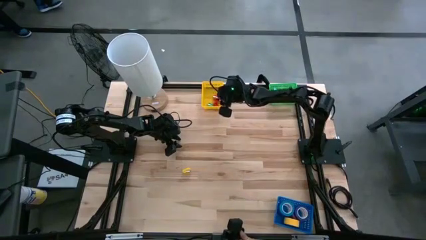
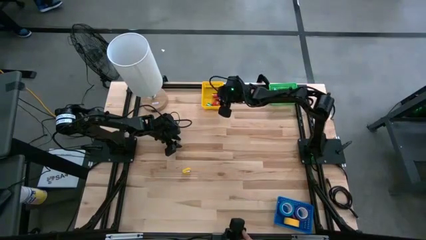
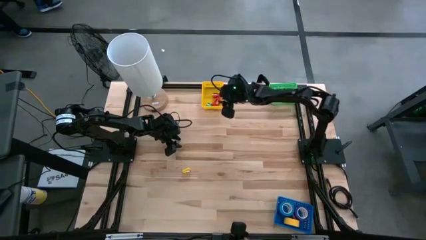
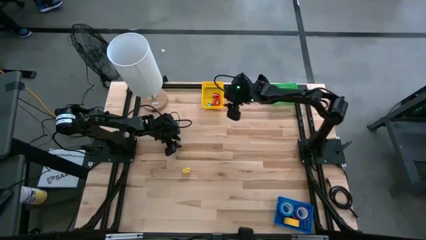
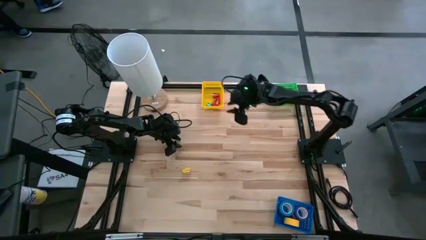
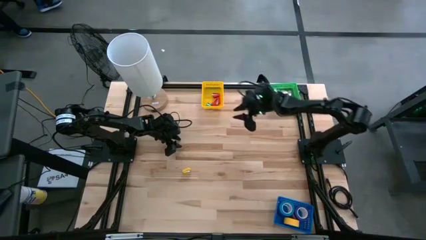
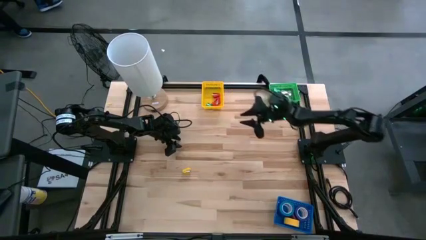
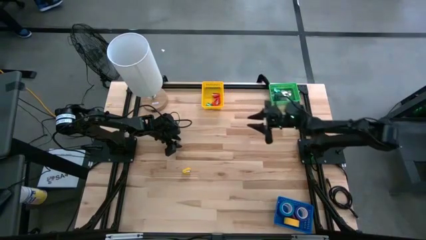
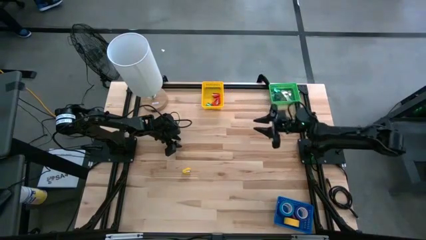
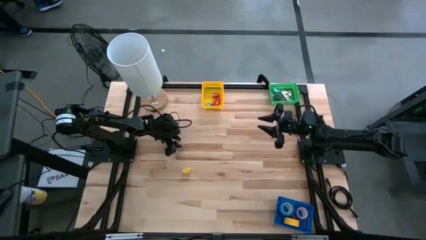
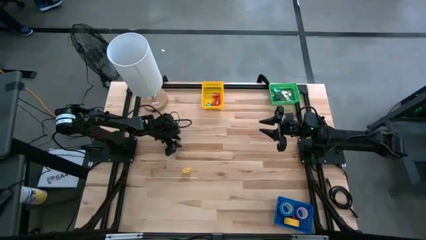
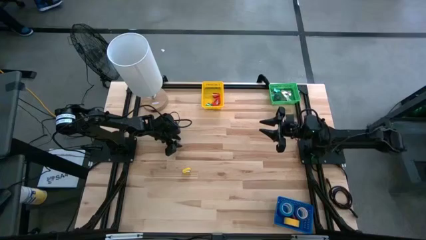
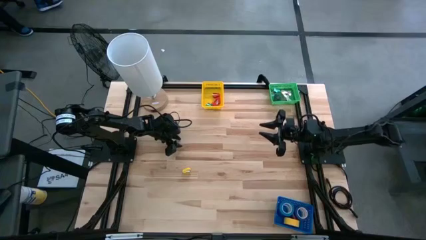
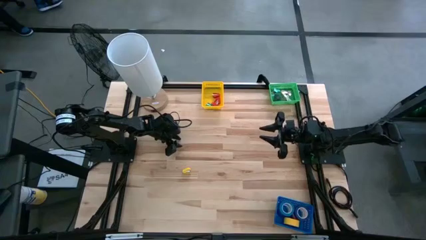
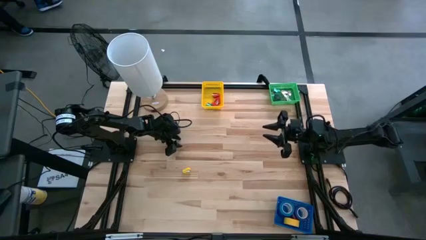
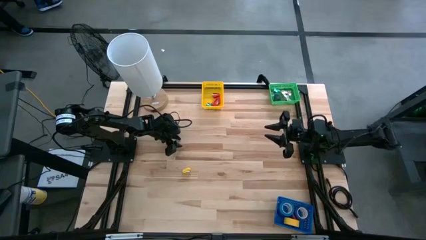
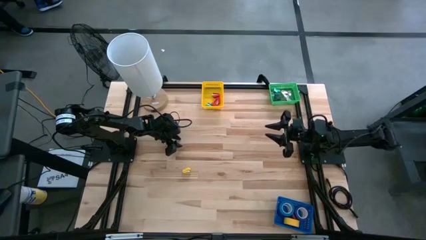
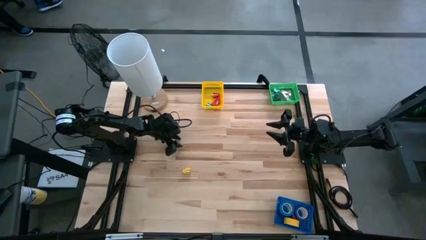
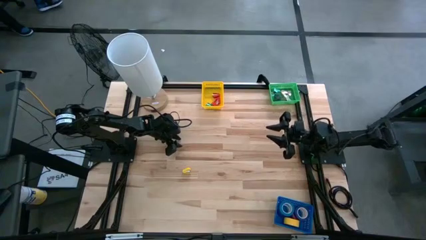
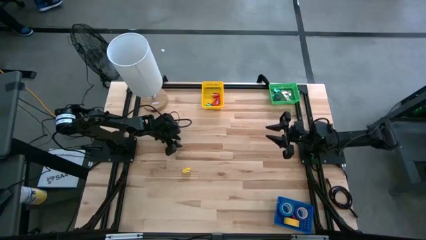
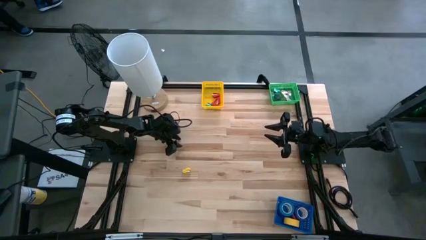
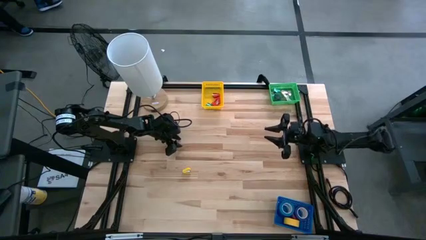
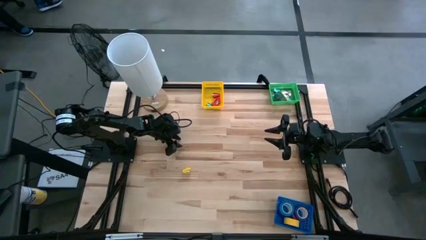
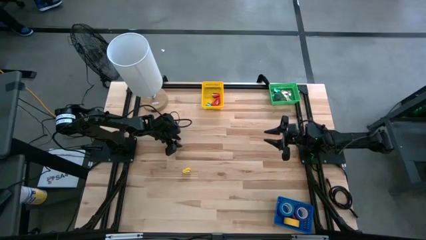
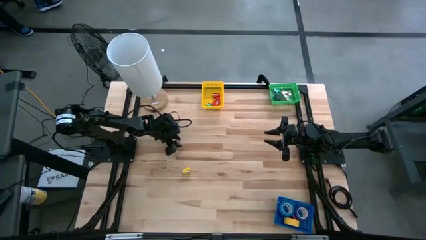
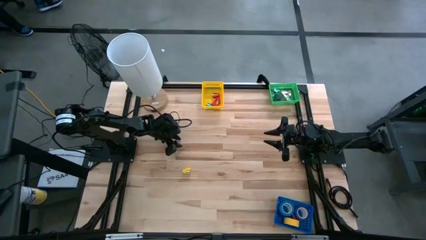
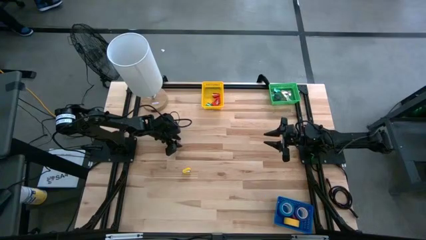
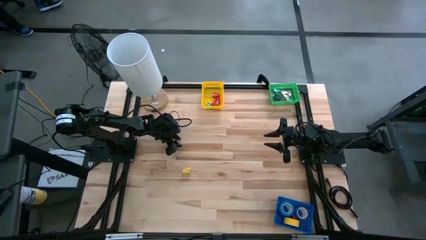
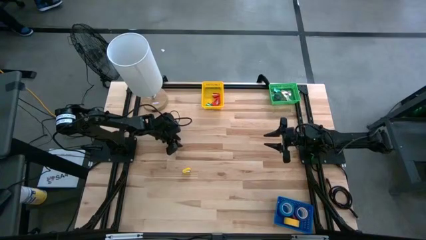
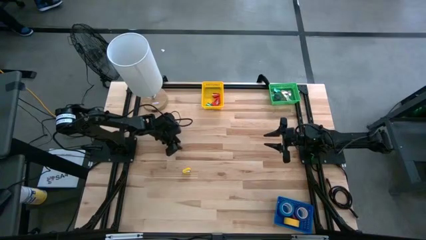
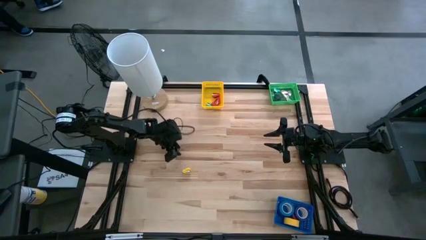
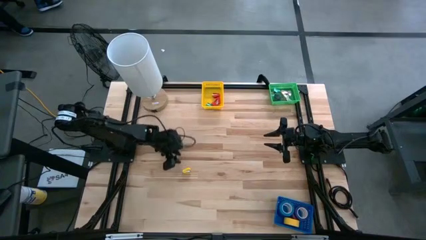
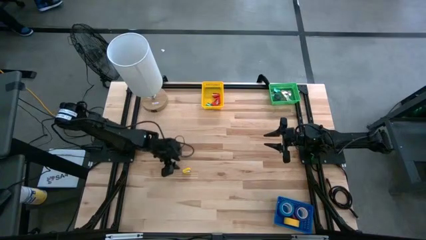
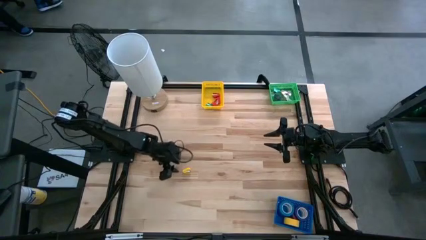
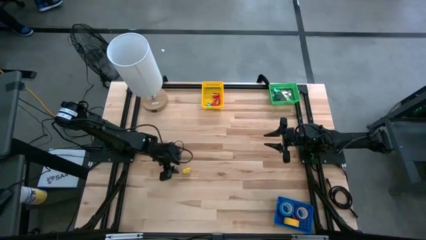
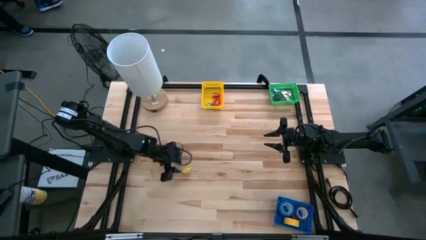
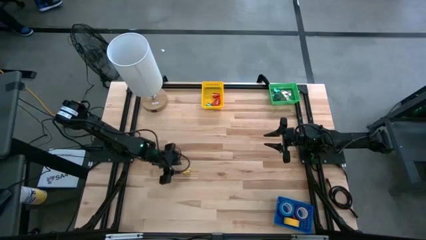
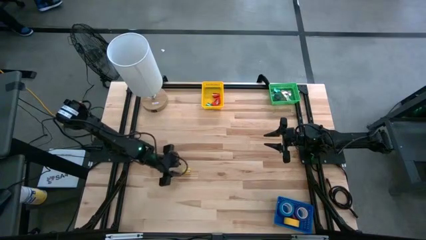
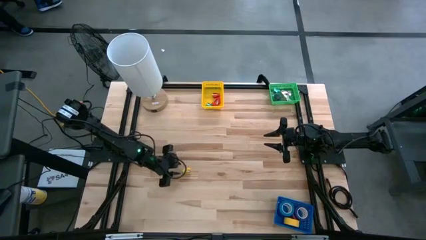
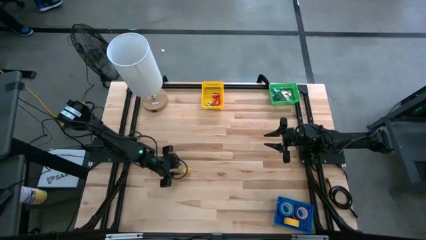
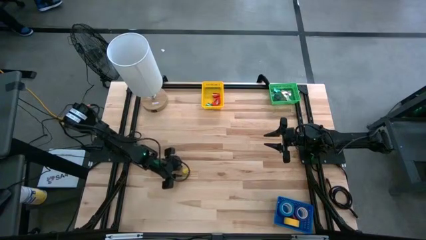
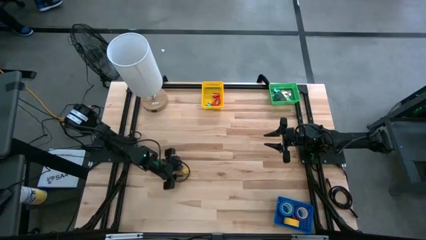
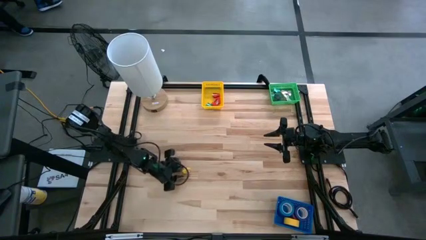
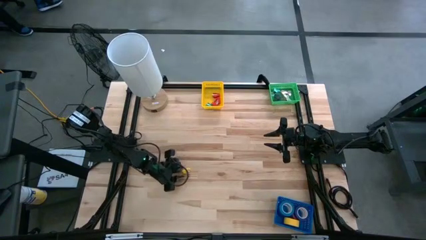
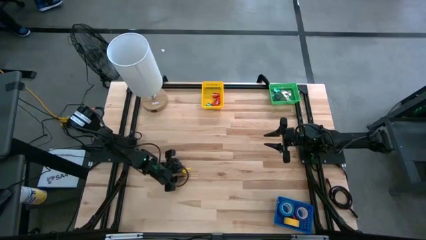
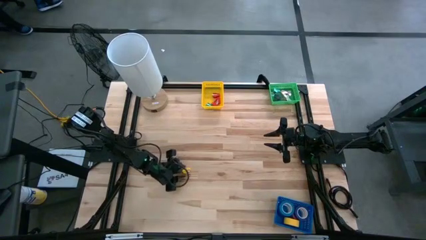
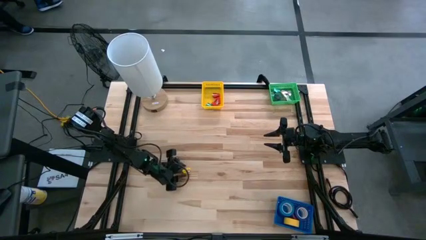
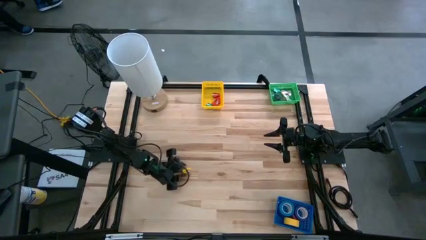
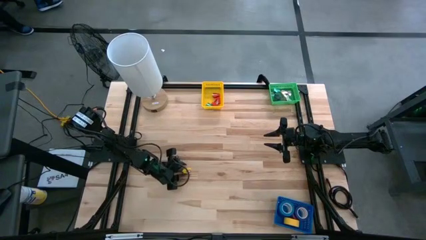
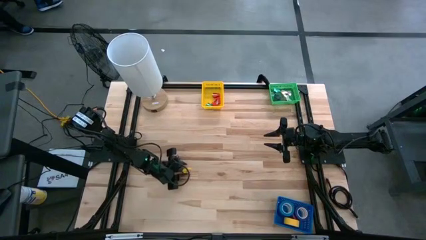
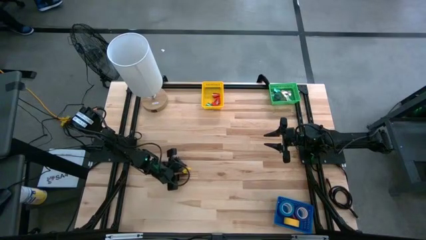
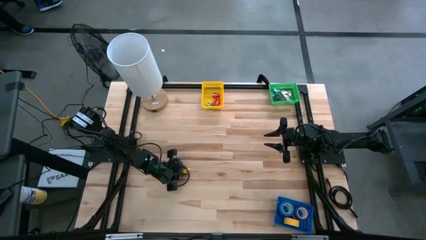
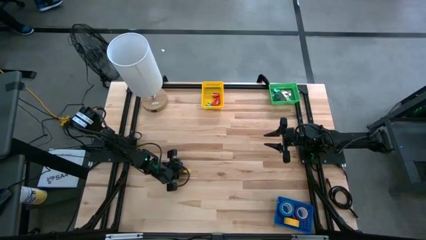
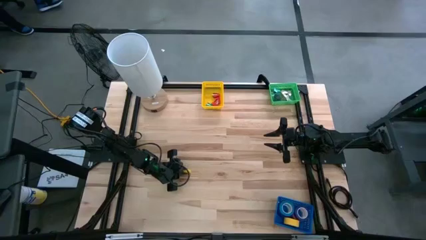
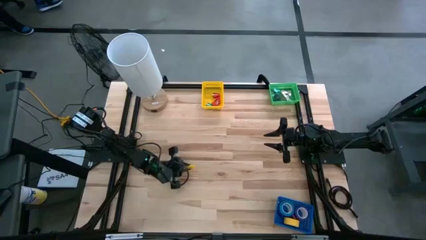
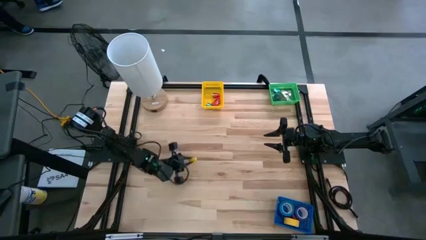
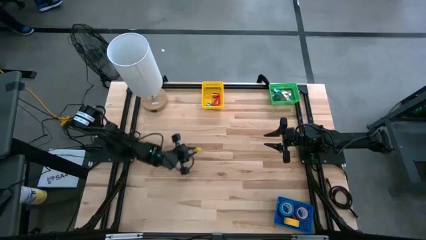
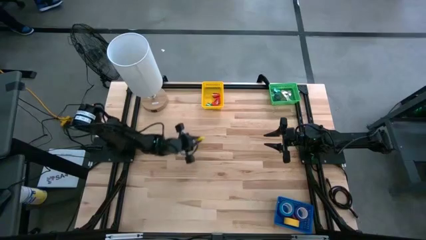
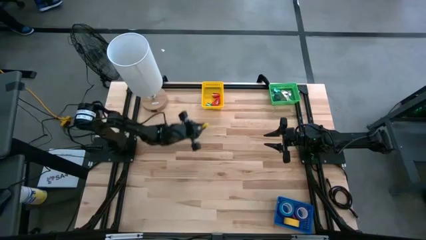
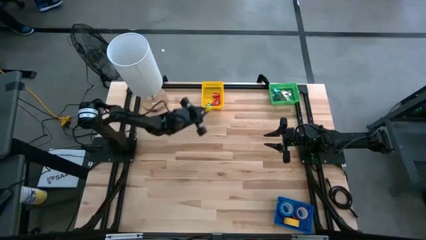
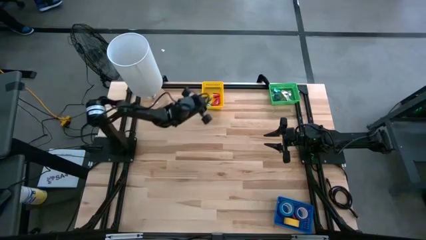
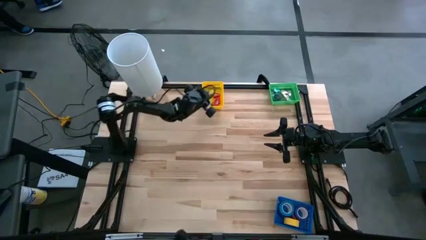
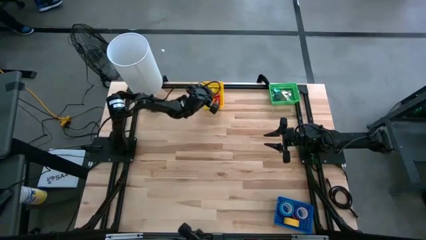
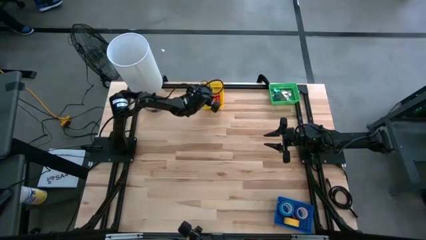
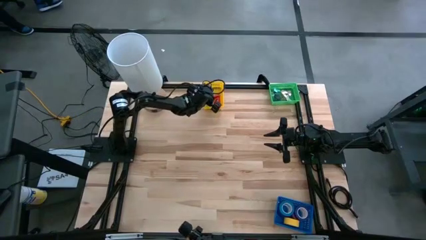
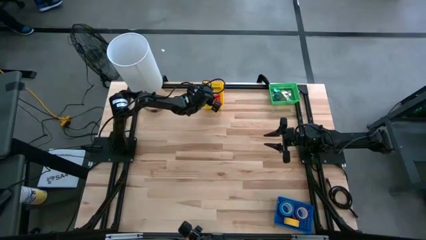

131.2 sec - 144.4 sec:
Task: Pick and place Stapler, Stapler remover, tape
Put the yellow stapler into the yellow bin

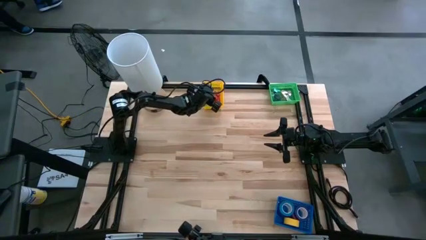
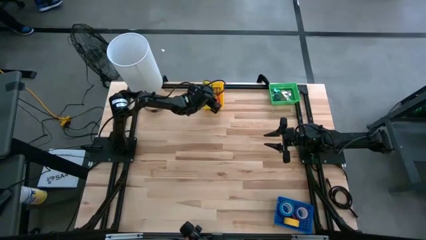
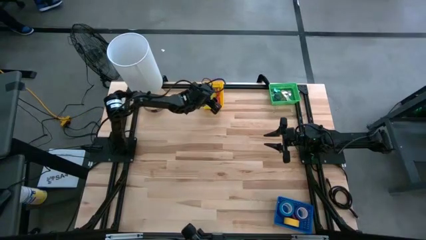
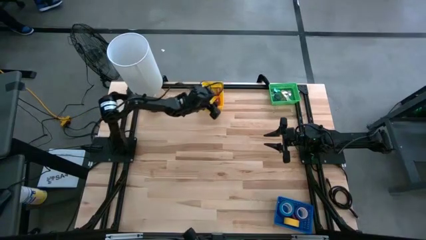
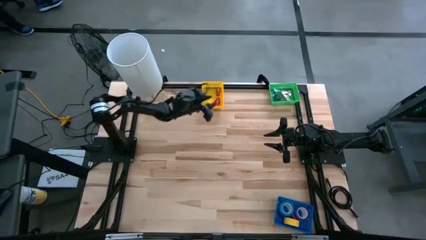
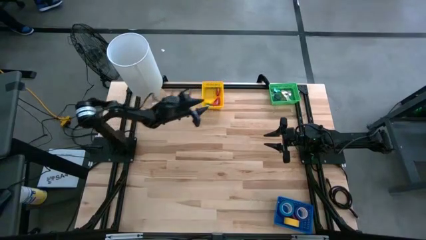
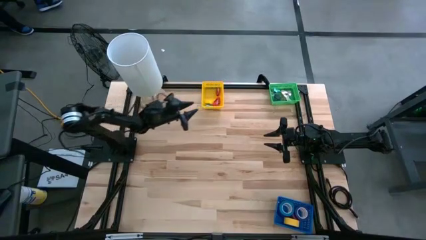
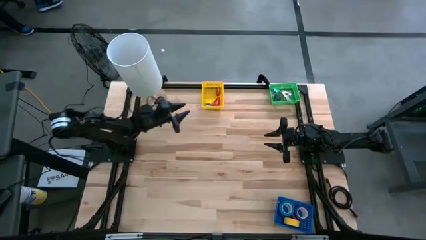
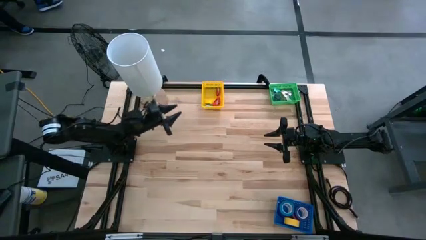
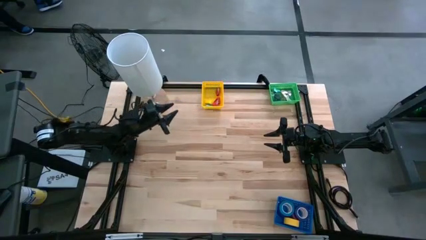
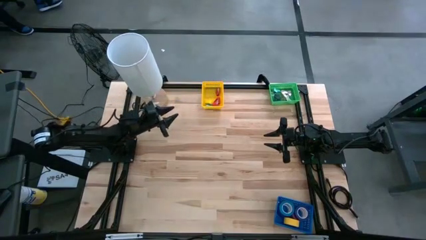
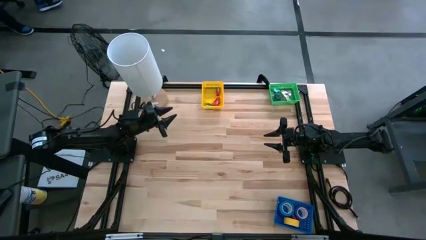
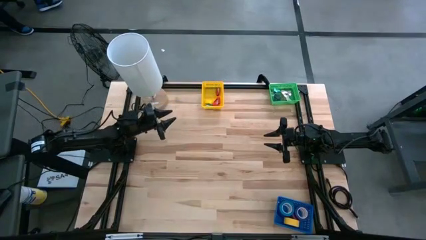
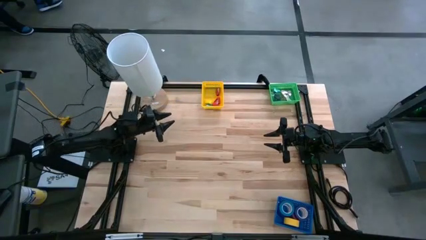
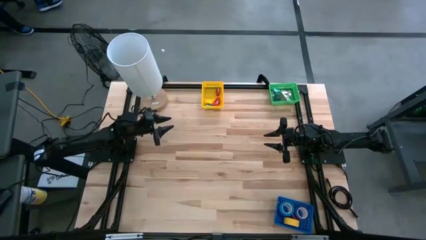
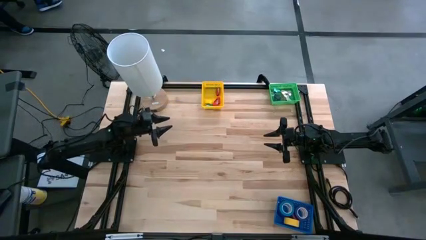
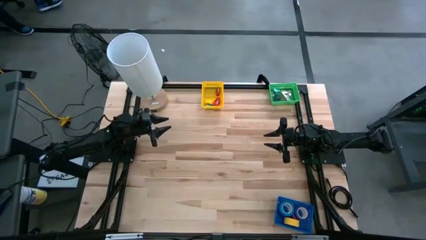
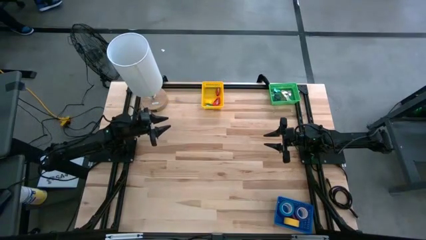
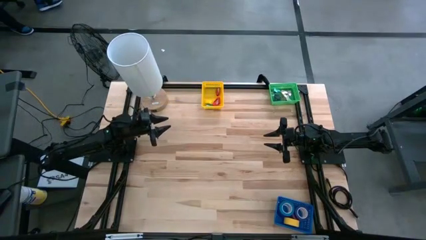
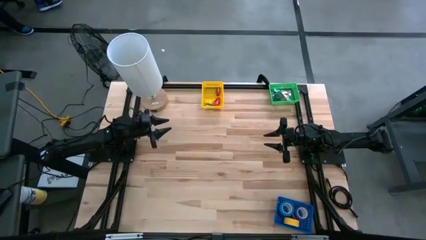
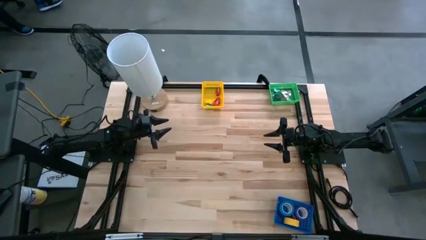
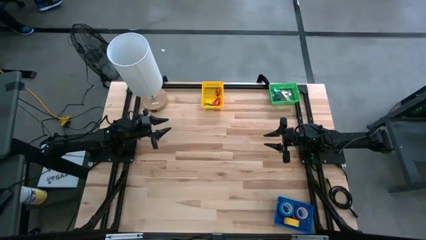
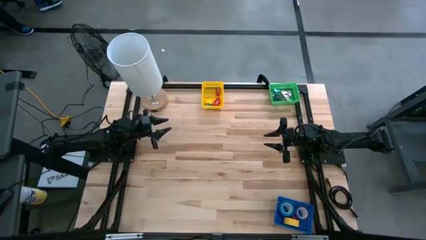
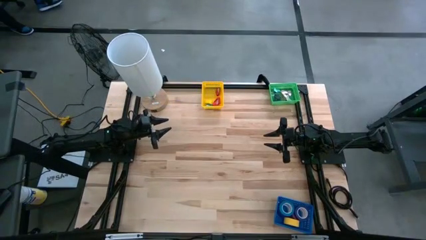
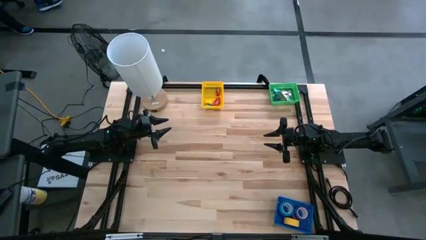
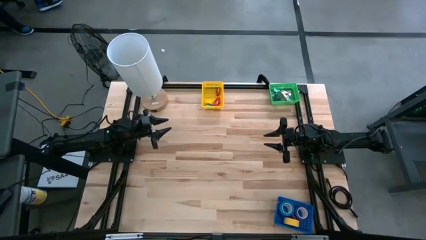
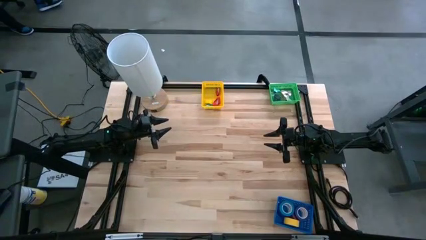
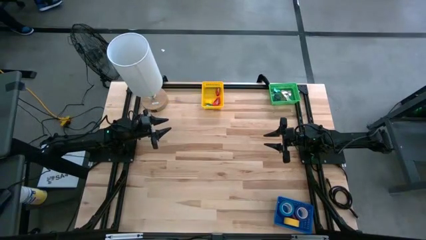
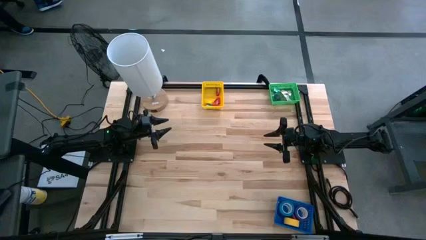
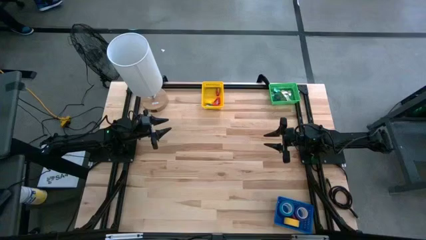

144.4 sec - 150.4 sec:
Return to Home Position
